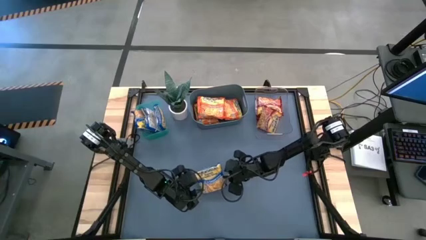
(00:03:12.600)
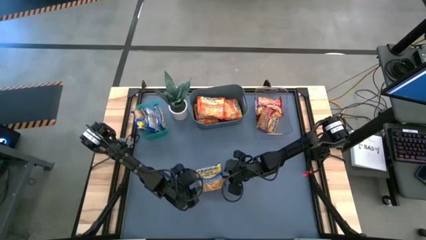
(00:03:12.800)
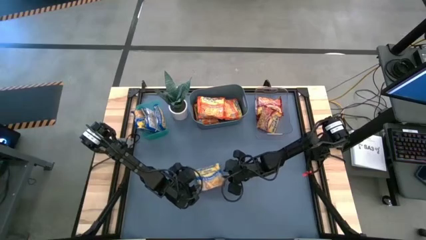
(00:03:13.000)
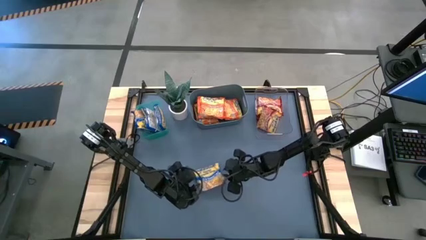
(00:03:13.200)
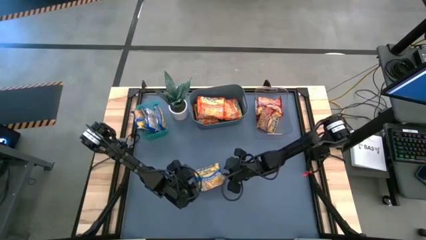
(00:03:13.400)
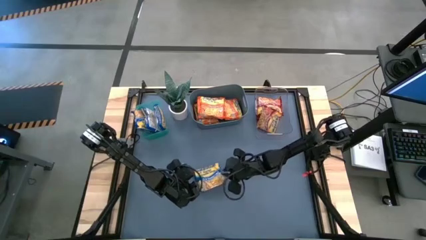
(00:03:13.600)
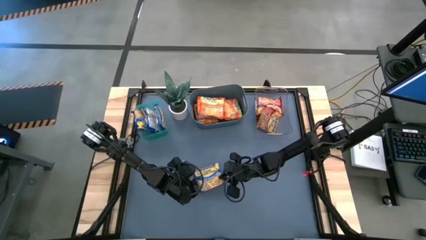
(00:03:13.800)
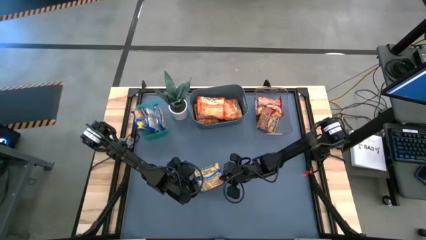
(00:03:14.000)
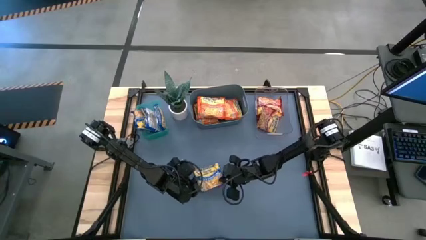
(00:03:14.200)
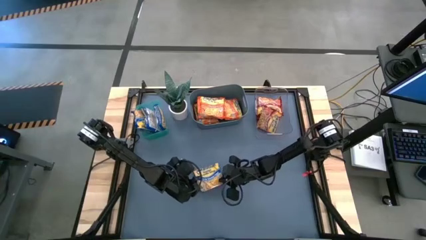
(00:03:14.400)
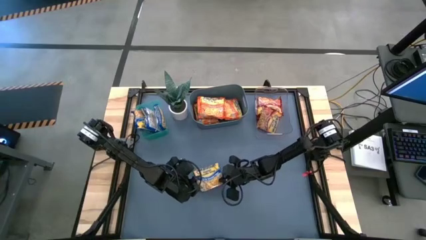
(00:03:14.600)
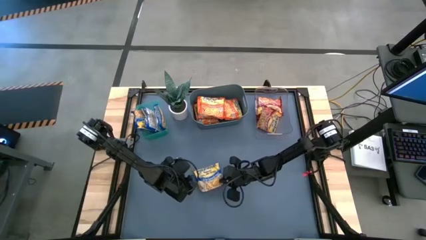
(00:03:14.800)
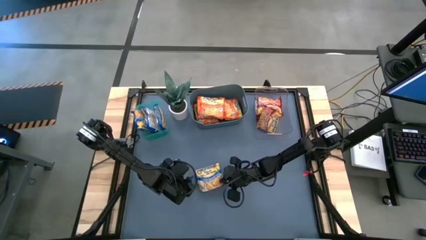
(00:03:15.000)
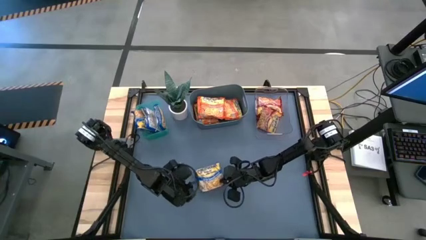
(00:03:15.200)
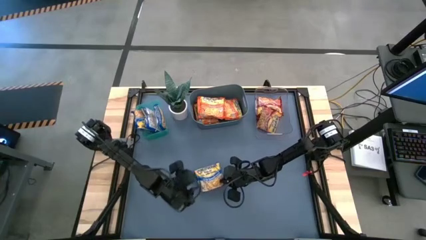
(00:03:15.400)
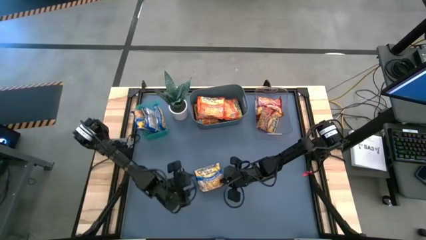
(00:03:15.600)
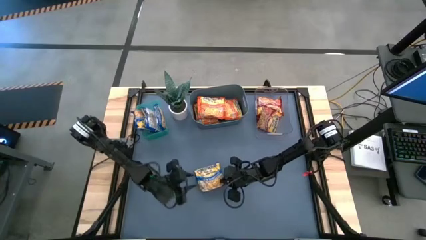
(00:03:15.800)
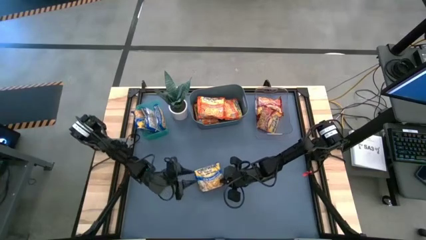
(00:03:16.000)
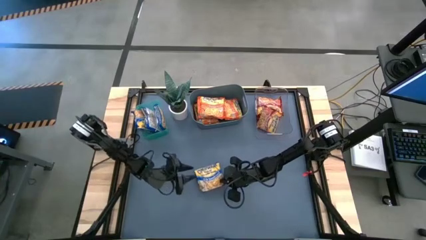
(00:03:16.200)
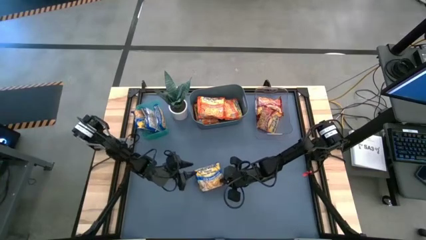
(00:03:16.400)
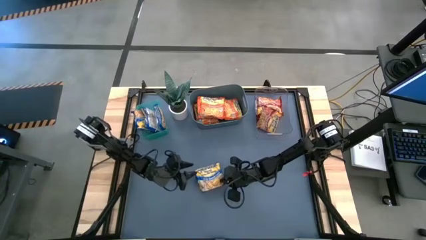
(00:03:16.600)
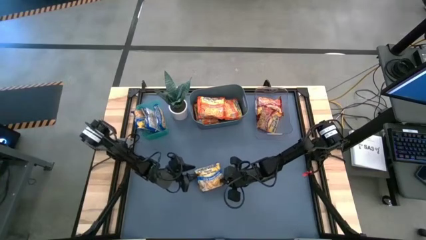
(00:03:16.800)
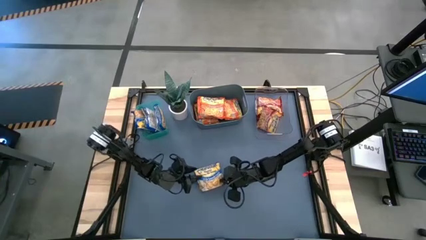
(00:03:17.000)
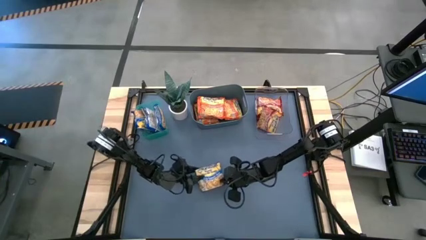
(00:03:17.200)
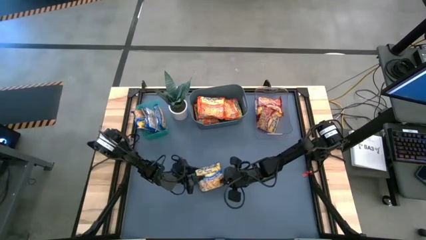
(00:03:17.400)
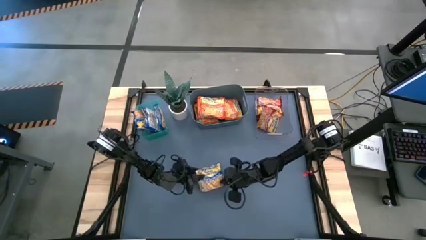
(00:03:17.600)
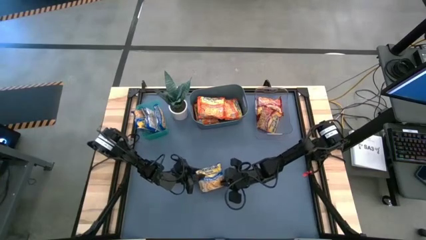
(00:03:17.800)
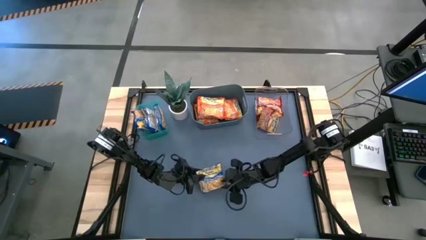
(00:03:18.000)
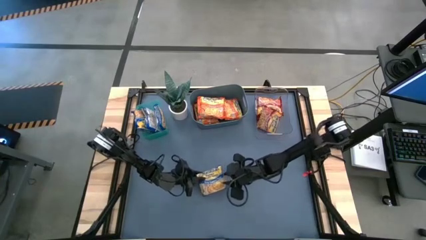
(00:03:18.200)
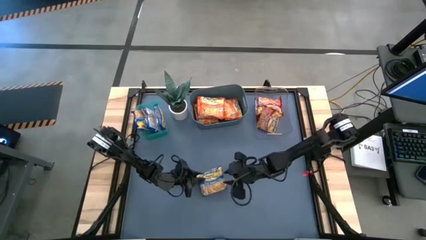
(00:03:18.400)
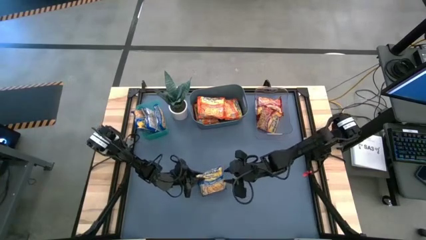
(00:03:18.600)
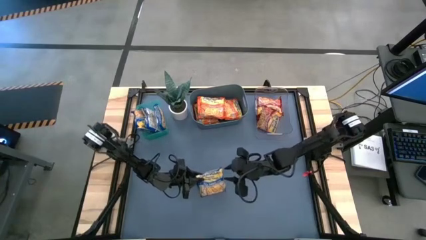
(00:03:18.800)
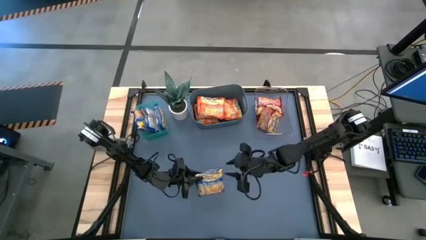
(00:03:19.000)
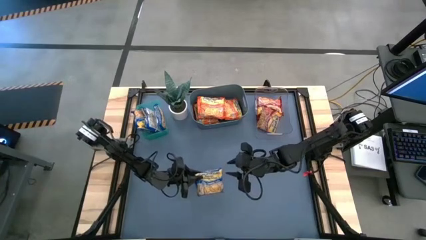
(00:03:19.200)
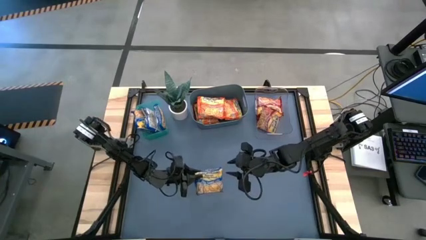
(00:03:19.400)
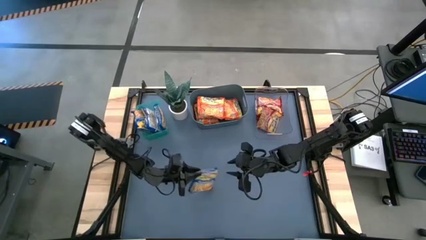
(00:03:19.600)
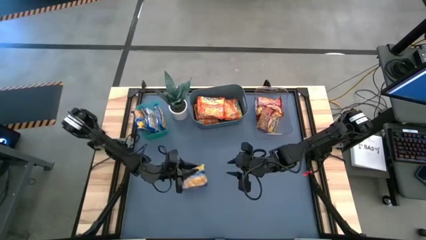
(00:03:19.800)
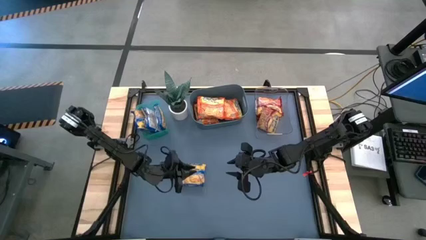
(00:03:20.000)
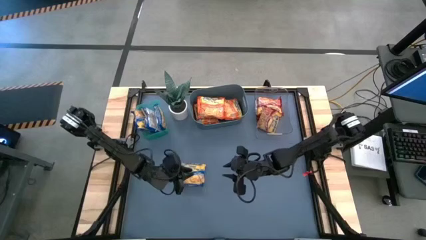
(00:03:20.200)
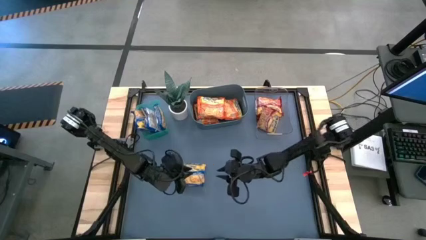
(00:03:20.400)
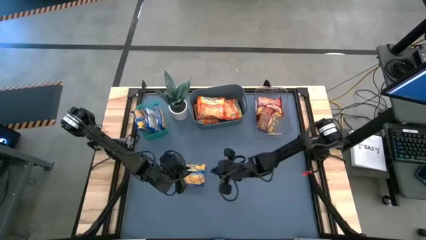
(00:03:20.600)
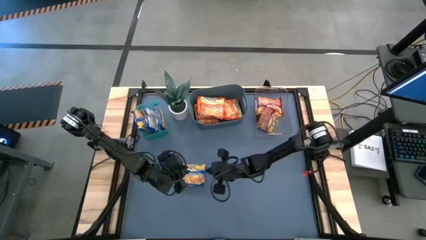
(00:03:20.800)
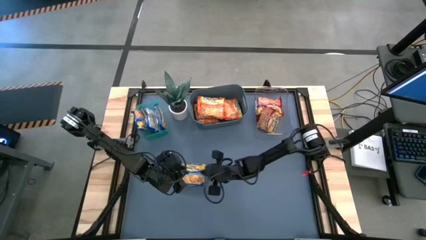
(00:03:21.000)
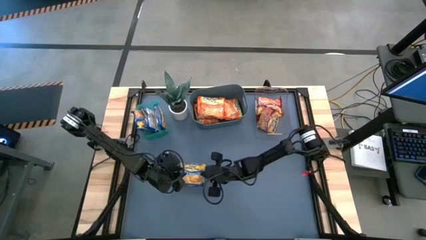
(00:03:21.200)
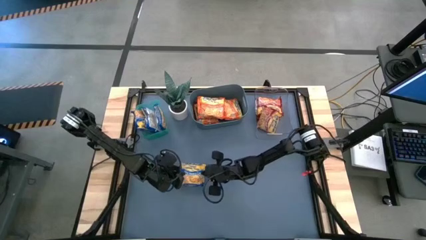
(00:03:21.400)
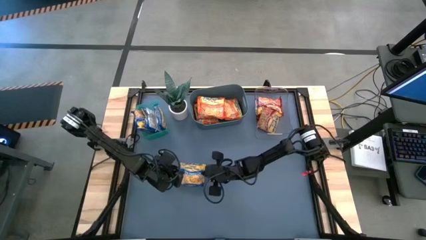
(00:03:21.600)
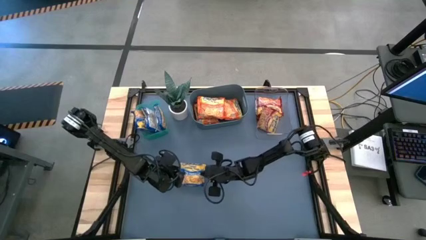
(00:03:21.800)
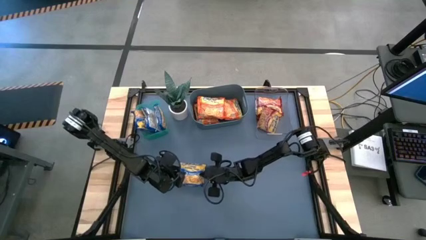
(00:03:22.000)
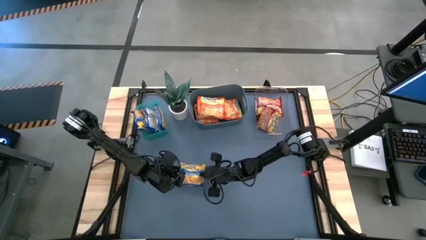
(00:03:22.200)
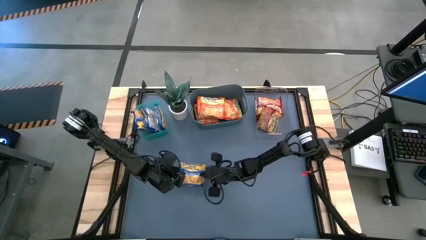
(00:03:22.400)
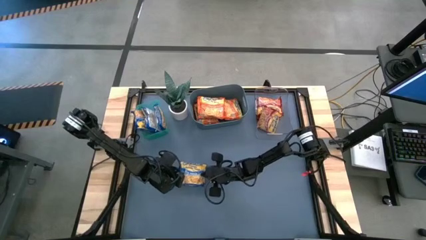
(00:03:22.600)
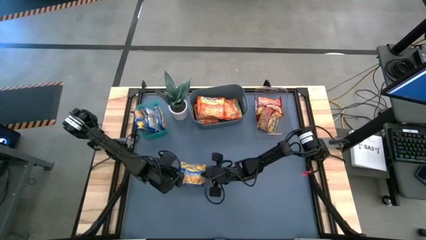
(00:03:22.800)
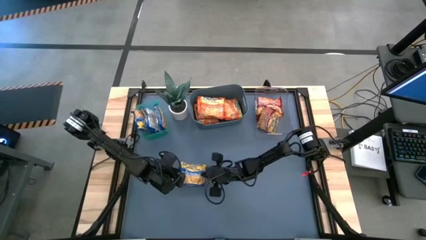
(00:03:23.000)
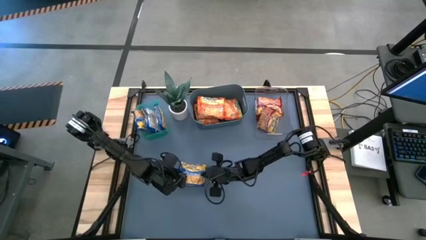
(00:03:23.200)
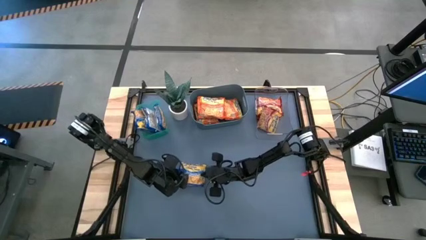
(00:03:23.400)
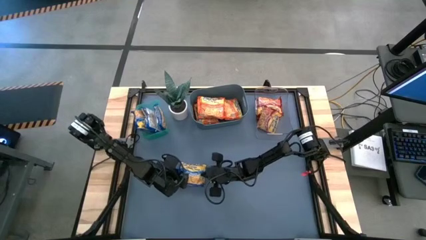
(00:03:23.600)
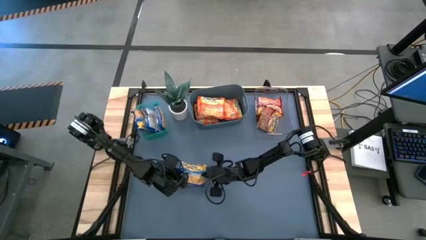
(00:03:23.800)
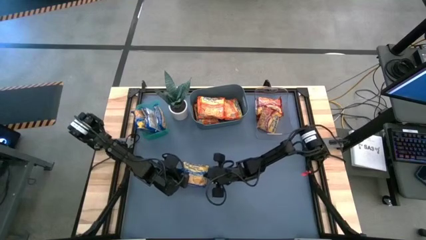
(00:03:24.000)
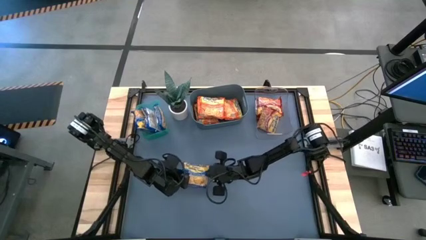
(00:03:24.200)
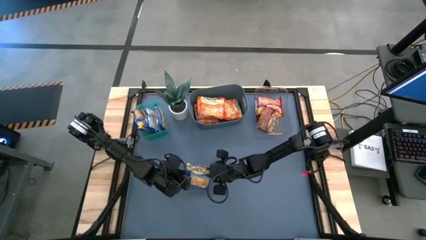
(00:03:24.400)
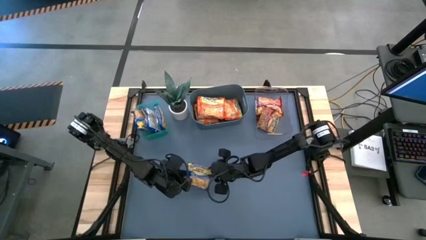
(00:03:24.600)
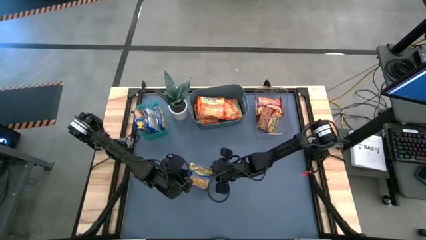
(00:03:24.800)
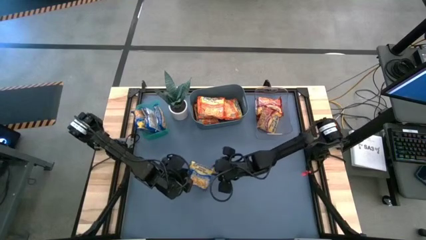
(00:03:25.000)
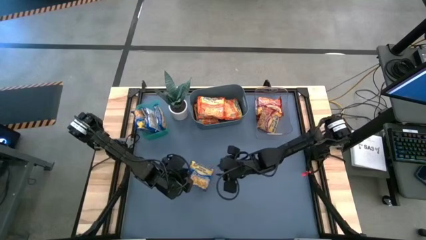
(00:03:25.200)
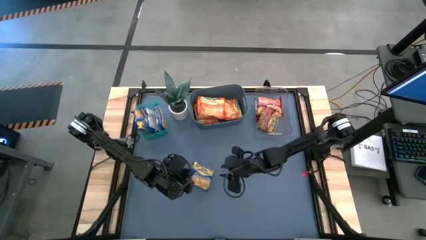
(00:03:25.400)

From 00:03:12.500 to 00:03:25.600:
Task: Sort Maruchan noodles
Put the blue noodle pack into the green bin

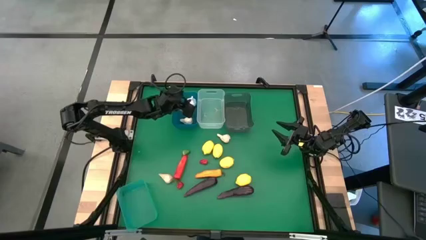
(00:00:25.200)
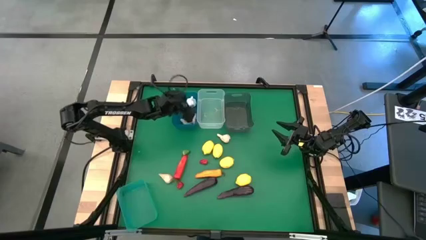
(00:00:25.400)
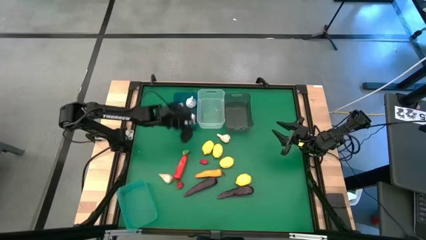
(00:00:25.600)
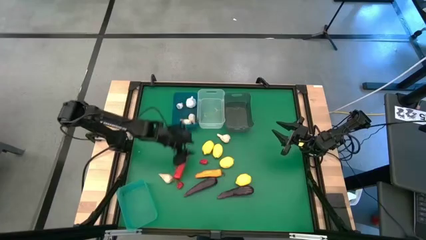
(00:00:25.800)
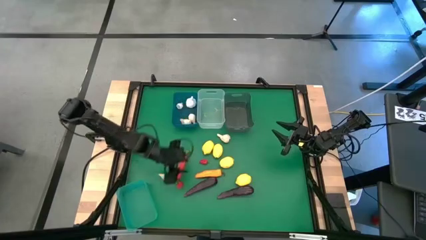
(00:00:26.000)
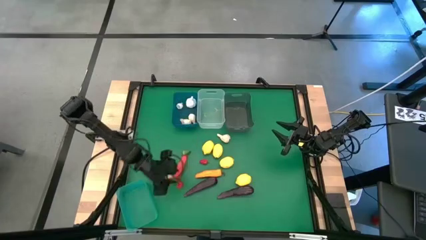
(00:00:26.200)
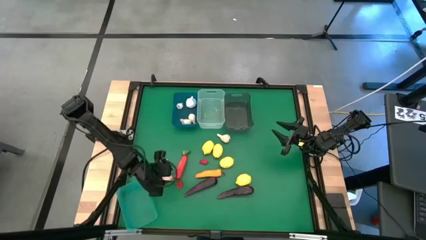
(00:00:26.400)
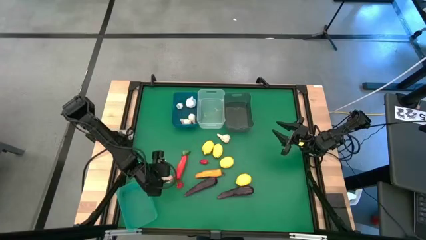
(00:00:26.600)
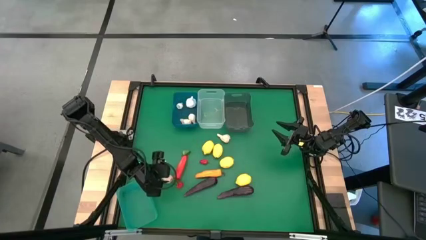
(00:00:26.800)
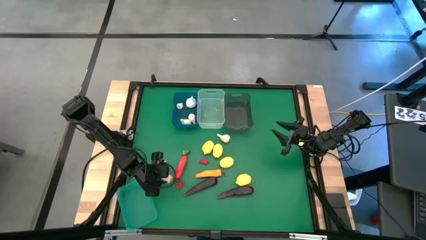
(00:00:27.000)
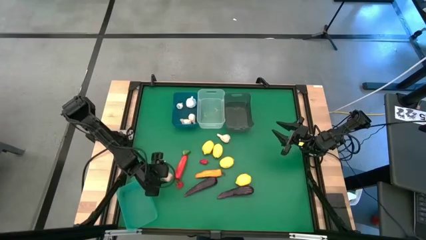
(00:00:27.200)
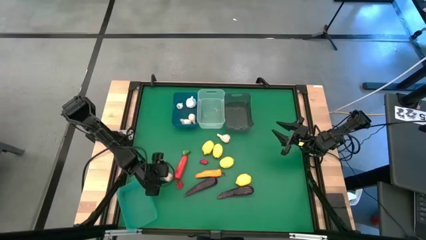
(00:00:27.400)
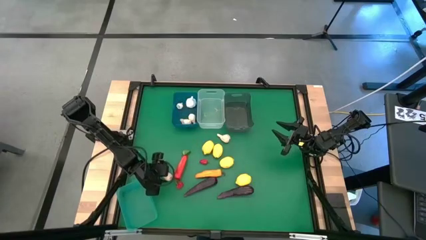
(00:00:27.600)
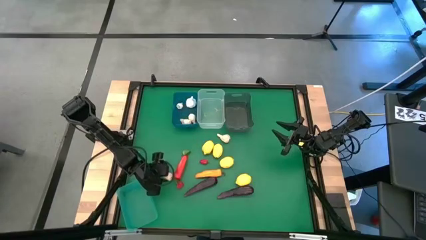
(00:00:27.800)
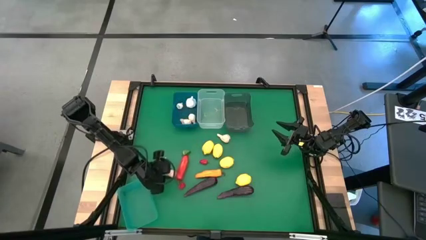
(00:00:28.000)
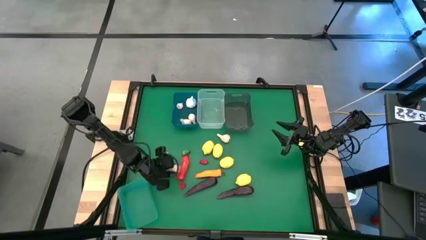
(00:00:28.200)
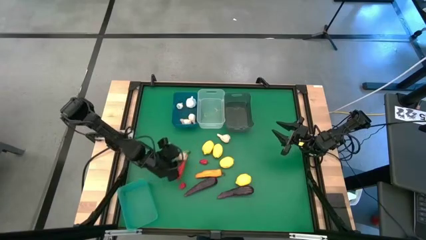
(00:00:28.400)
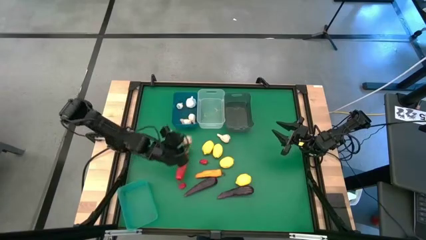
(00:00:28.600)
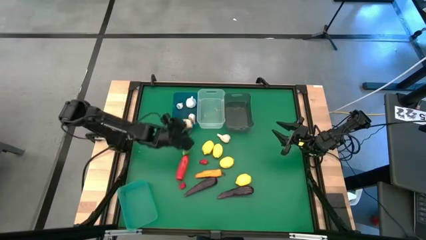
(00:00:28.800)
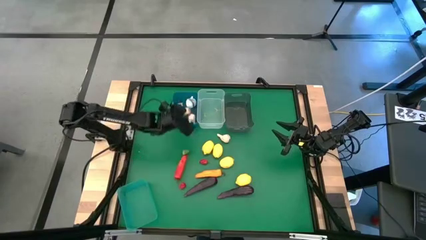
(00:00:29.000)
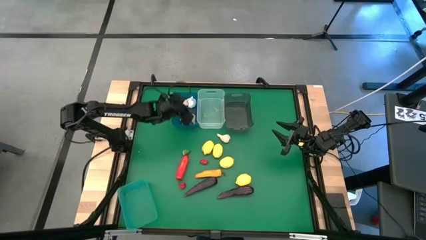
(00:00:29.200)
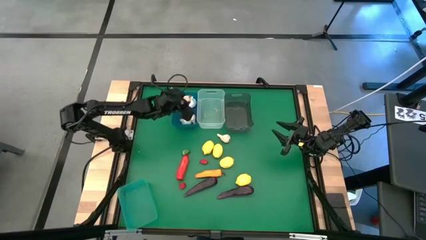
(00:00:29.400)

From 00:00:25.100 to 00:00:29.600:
Task: Sort produce into baskets
Put the white garlic into the blue bin
